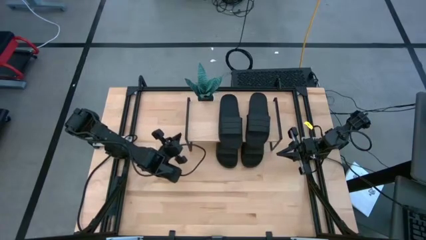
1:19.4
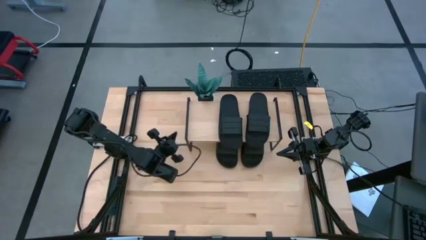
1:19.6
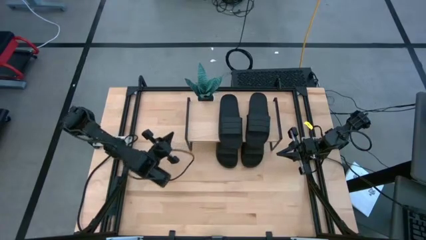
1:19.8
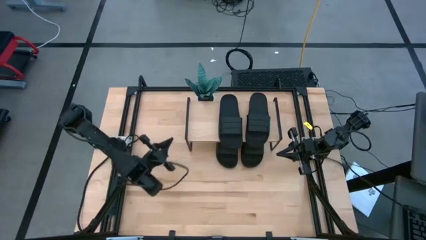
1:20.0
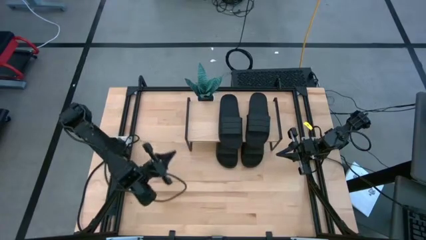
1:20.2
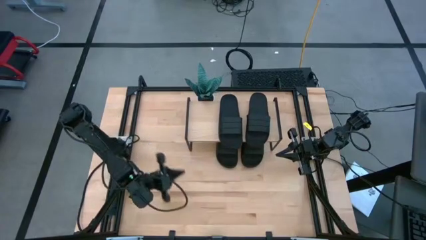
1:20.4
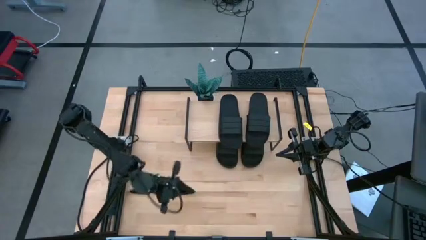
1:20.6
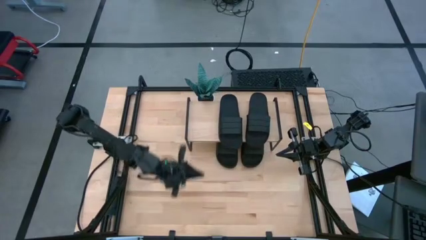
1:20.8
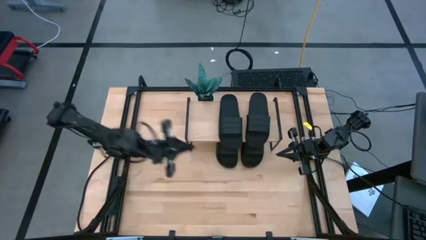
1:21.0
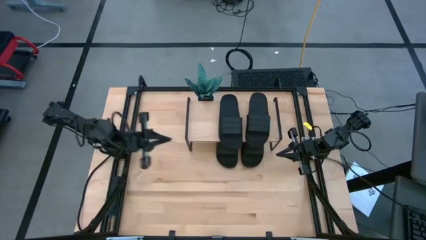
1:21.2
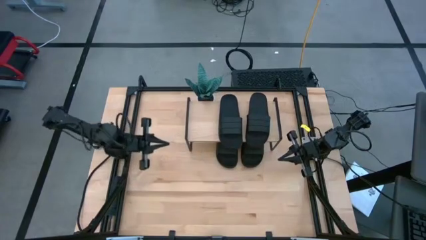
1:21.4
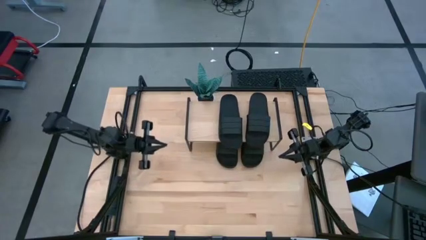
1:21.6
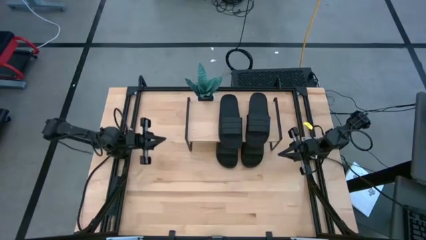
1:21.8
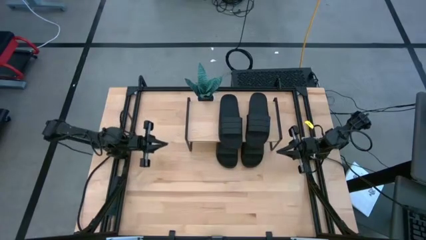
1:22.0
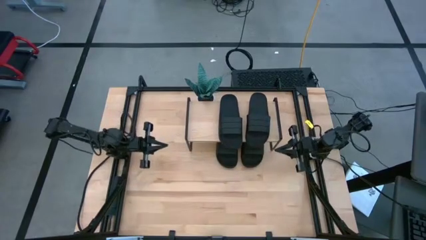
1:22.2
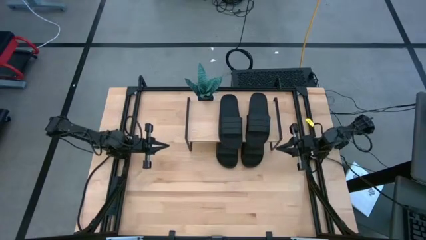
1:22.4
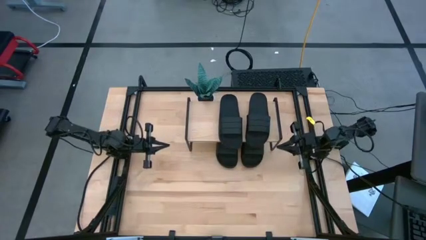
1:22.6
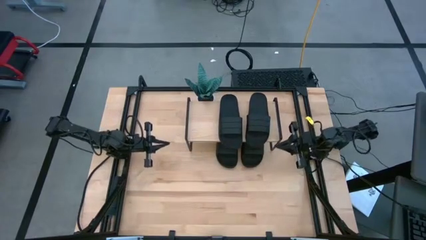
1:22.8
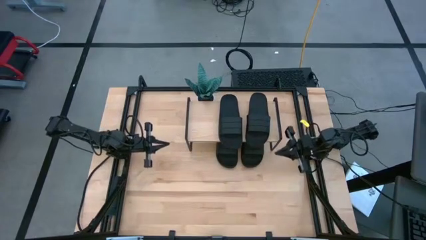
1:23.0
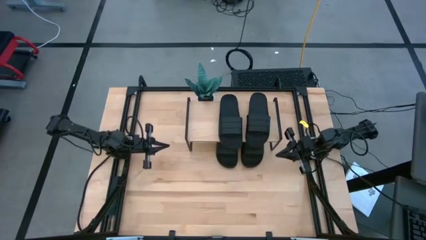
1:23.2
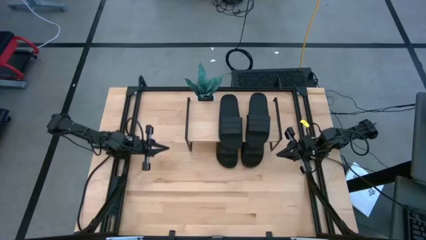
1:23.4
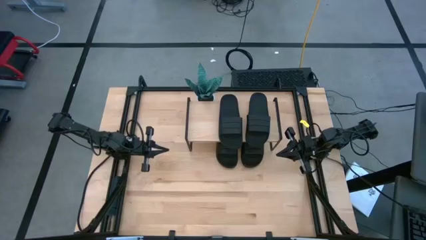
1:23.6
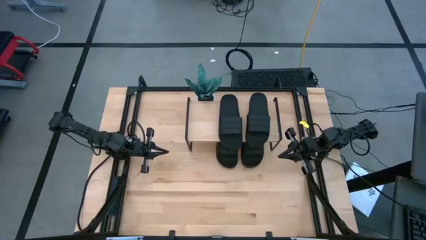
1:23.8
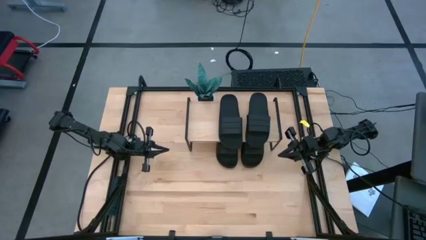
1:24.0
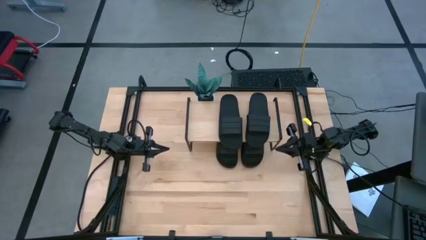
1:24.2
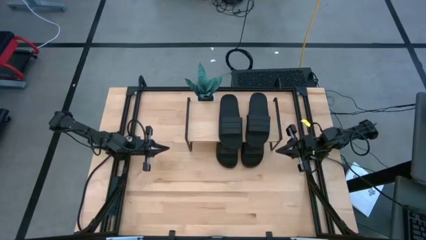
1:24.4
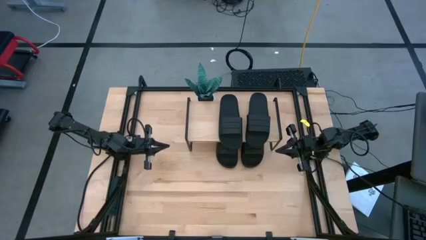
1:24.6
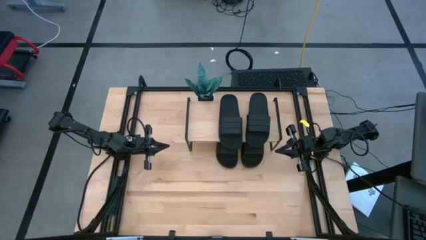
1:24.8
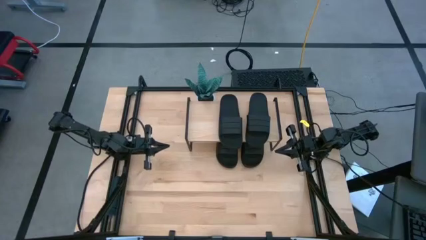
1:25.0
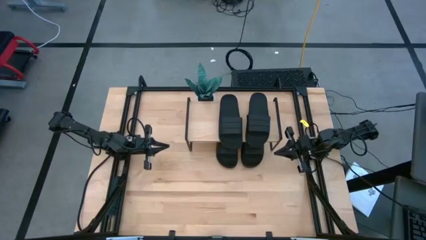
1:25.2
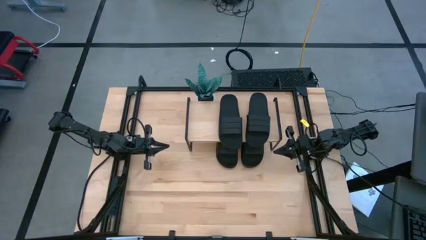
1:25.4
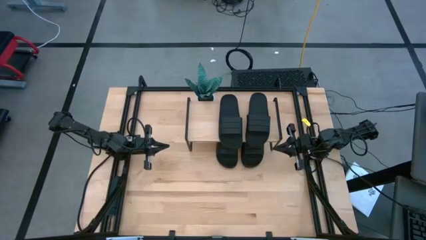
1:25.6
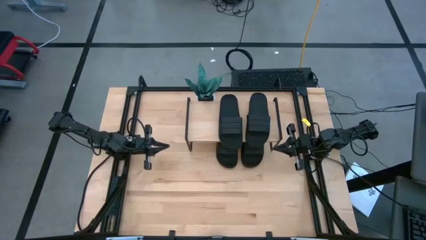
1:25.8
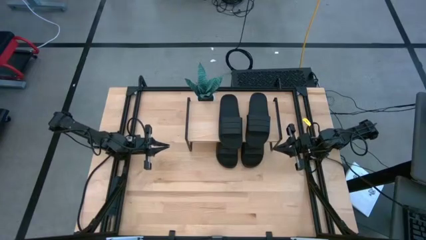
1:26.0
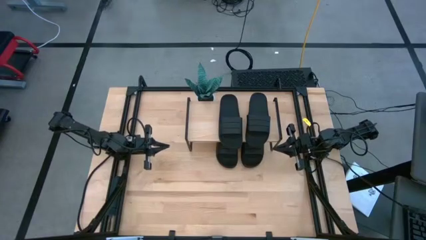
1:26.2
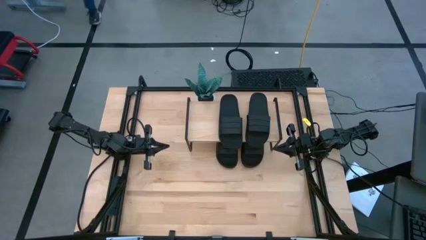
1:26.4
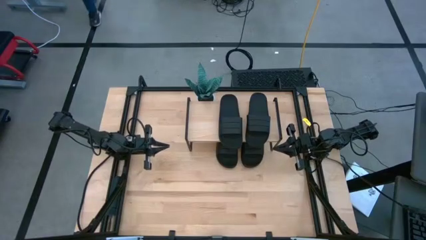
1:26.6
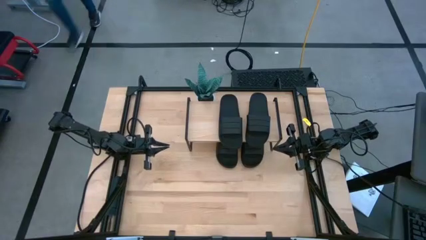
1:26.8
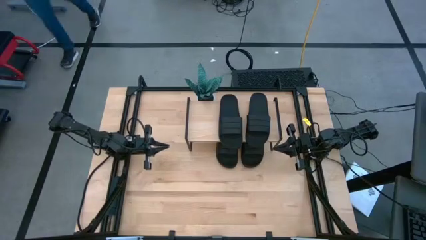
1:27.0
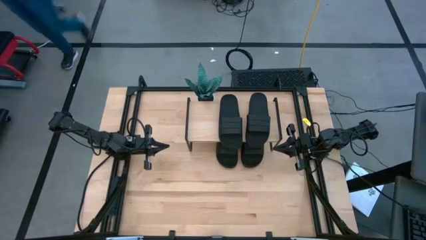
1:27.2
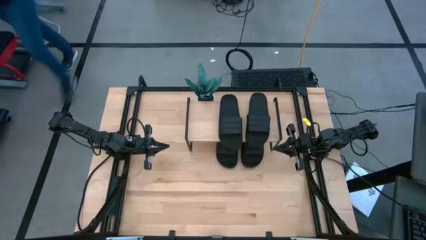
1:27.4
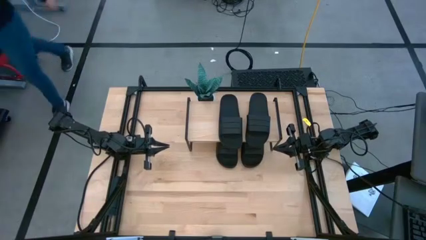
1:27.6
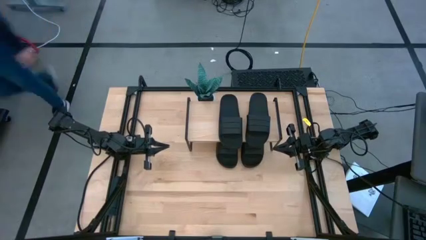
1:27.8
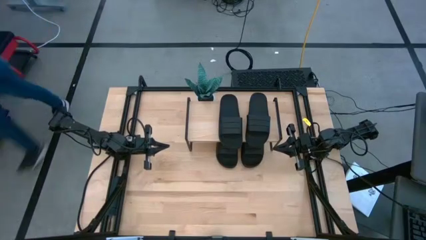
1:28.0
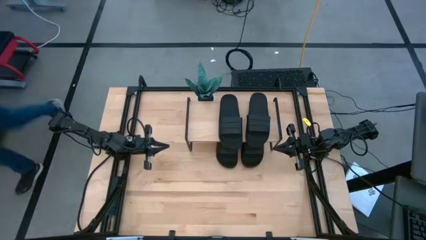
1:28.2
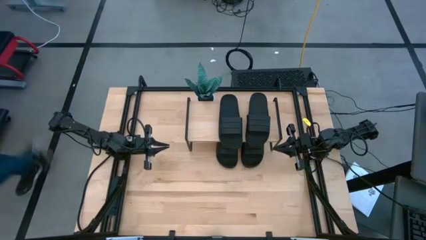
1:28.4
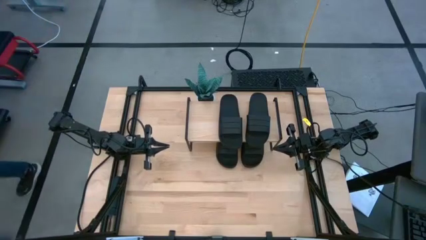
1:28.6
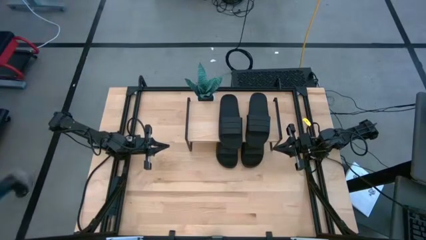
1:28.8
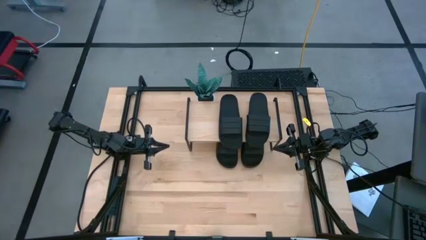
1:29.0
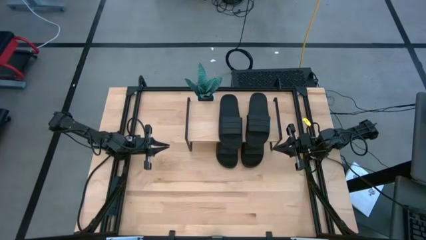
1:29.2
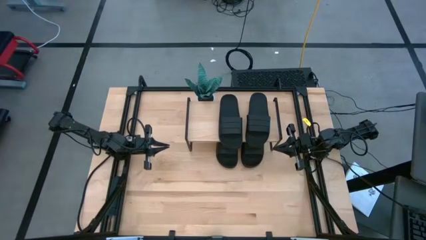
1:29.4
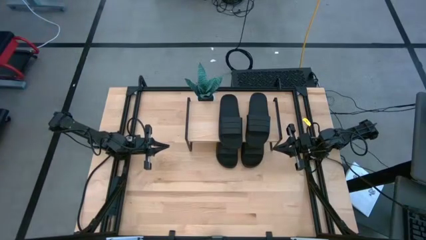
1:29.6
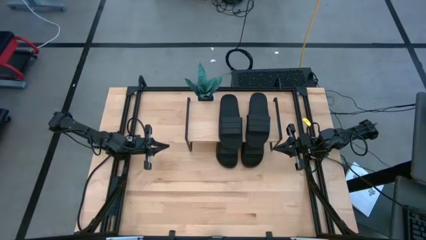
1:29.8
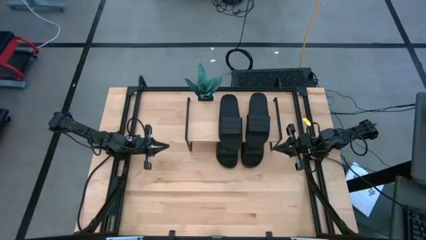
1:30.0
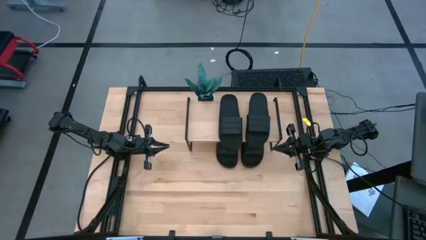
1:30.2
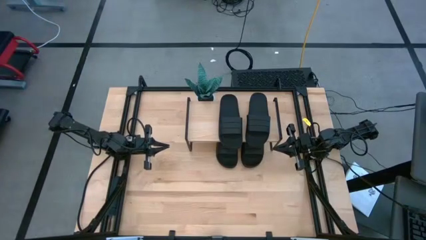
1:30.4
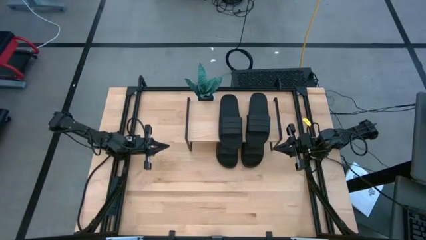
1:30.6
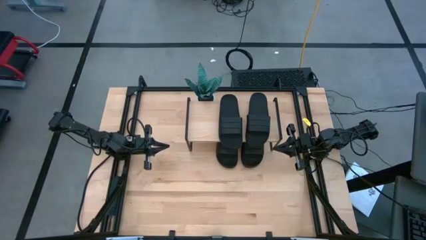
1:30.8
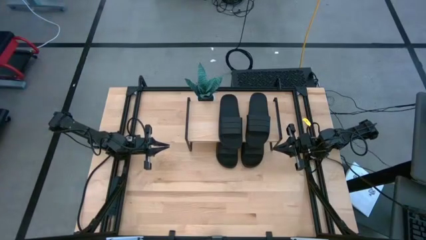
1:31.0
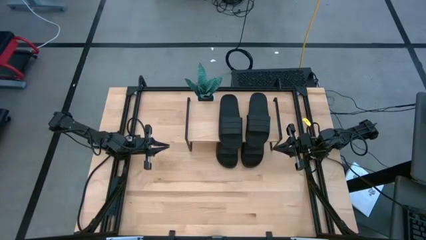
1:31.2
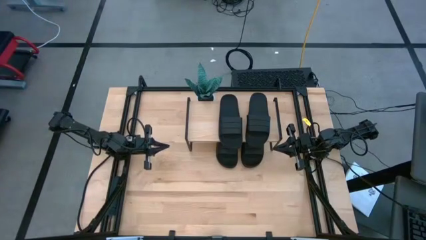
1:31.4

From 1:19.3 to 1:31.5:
Task: Pick and place slides into the shelf
Return to Home Position
